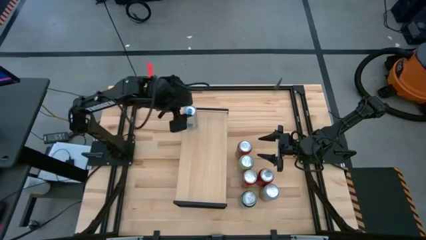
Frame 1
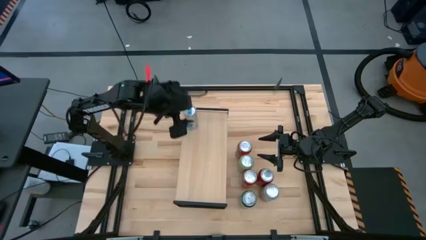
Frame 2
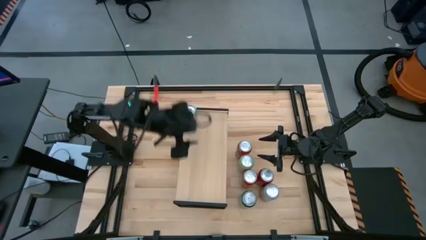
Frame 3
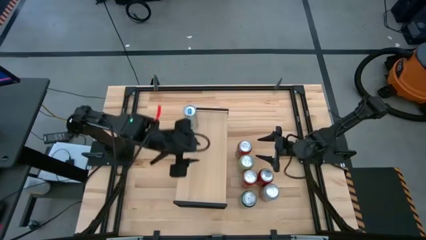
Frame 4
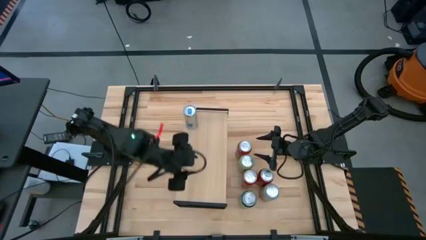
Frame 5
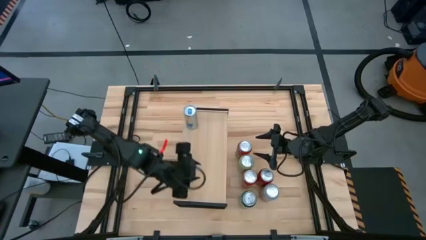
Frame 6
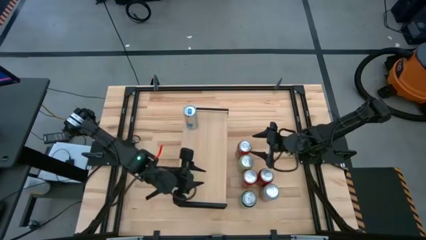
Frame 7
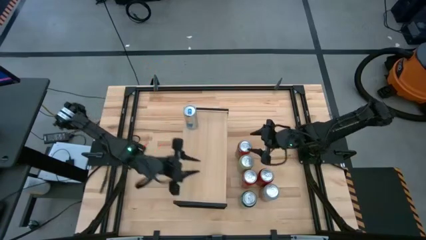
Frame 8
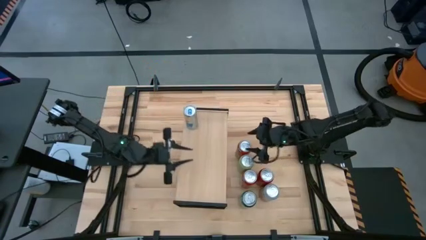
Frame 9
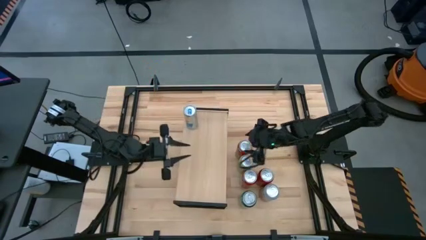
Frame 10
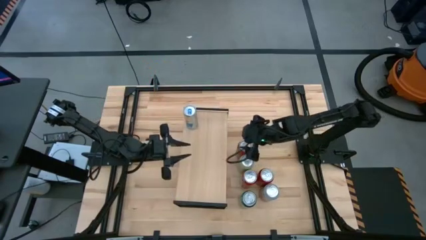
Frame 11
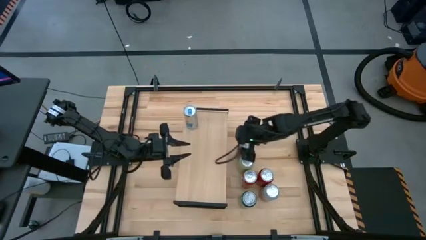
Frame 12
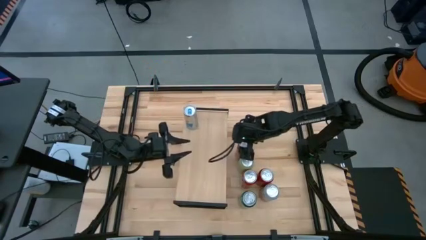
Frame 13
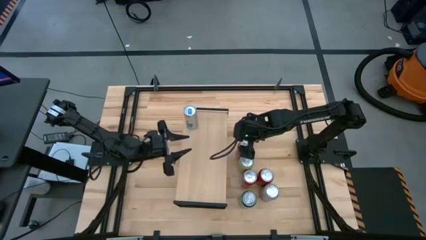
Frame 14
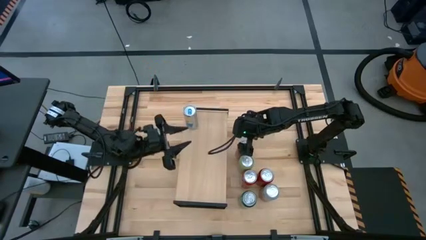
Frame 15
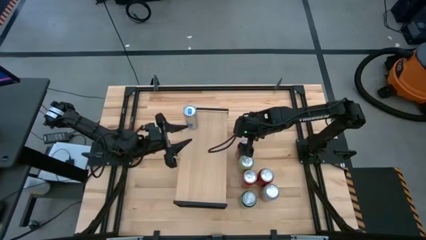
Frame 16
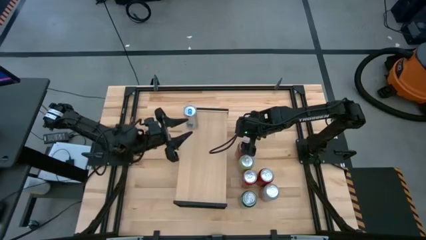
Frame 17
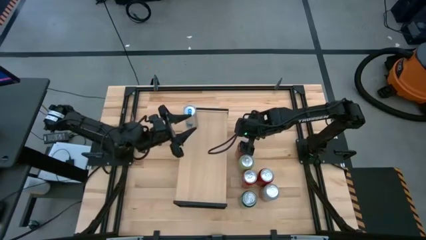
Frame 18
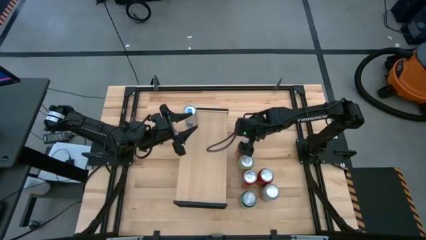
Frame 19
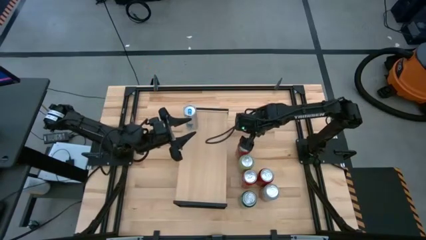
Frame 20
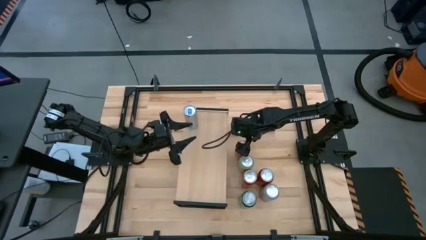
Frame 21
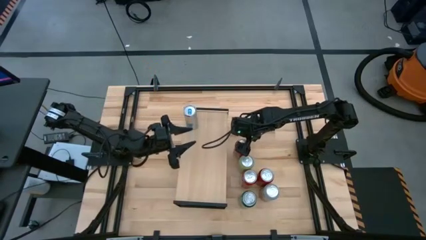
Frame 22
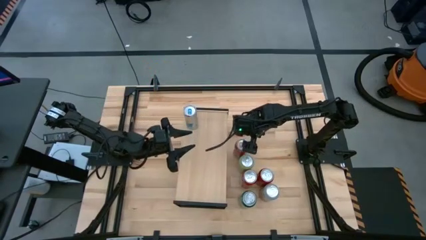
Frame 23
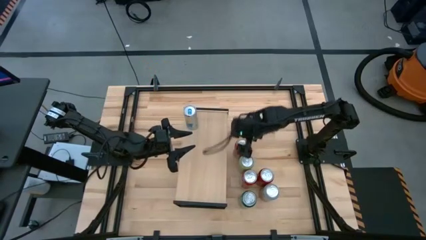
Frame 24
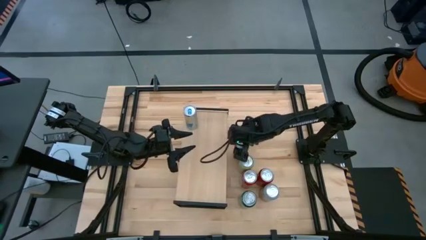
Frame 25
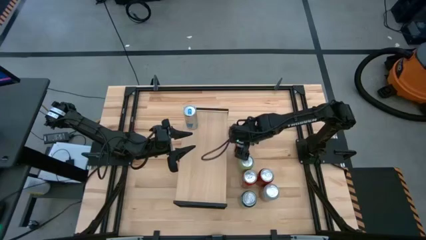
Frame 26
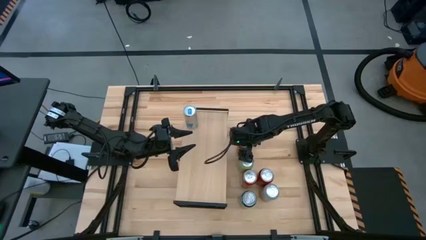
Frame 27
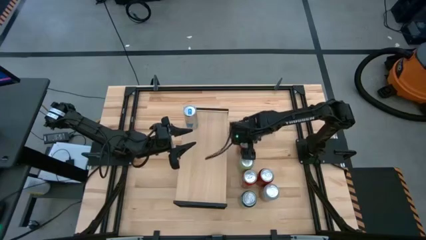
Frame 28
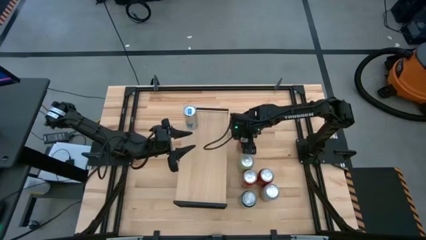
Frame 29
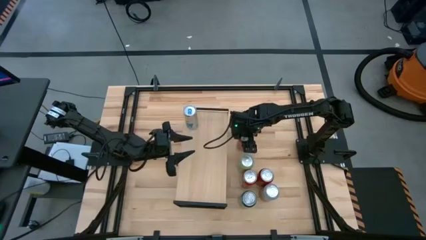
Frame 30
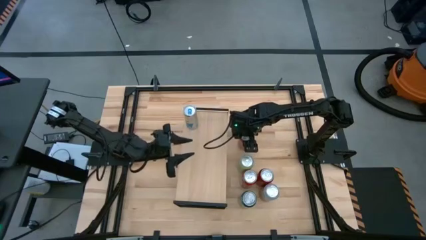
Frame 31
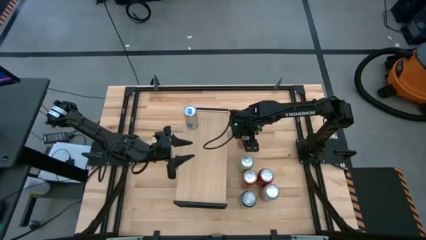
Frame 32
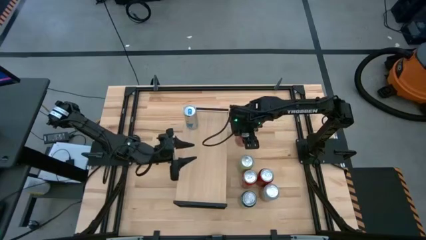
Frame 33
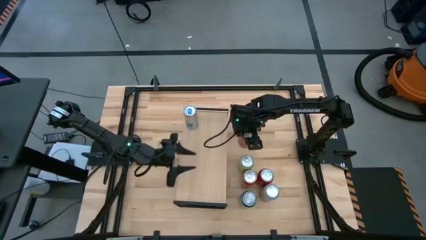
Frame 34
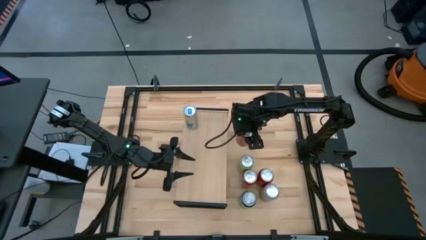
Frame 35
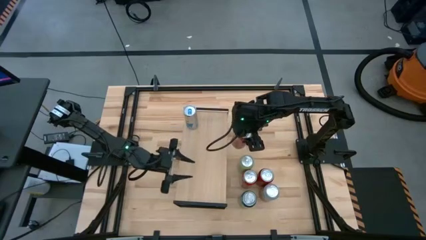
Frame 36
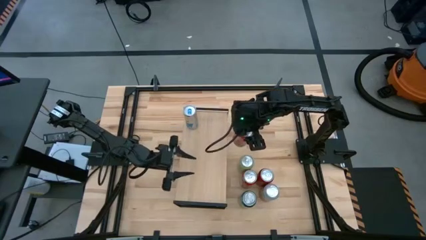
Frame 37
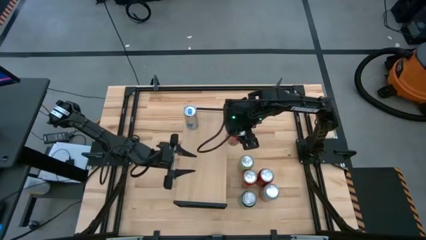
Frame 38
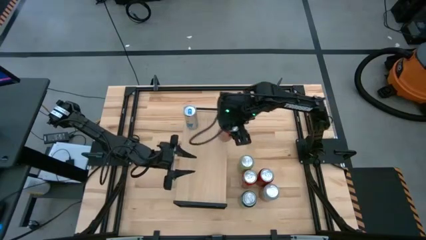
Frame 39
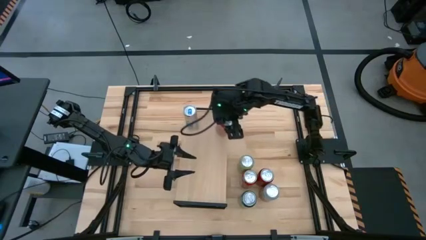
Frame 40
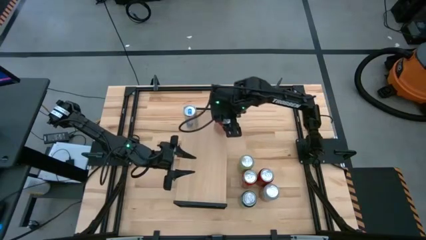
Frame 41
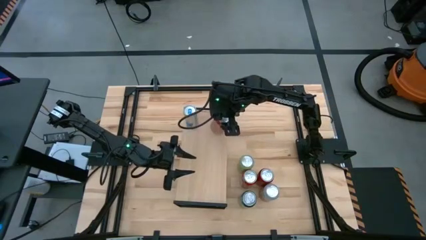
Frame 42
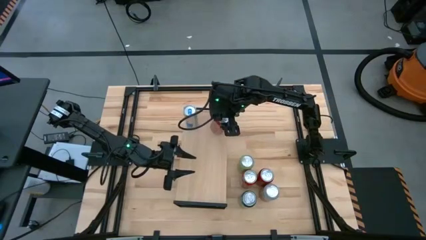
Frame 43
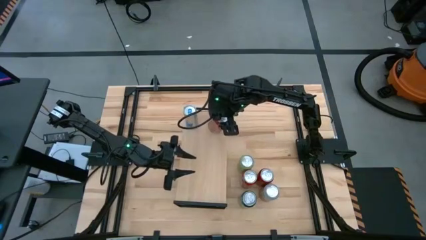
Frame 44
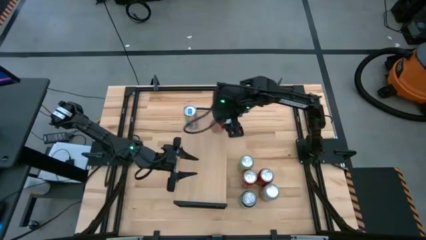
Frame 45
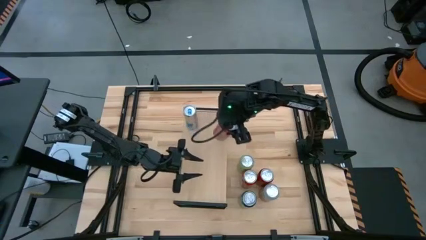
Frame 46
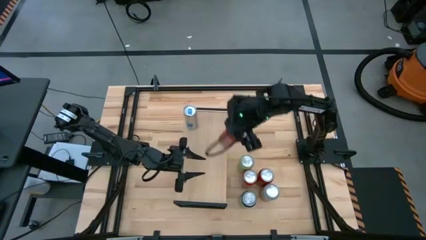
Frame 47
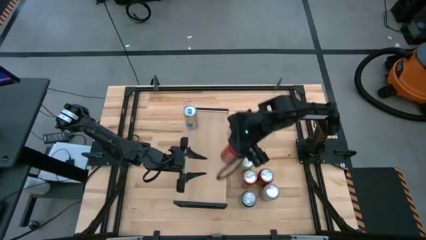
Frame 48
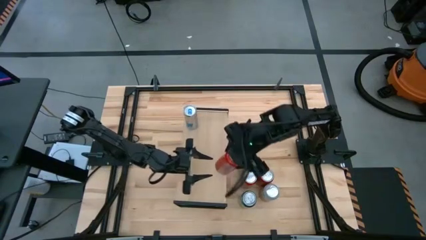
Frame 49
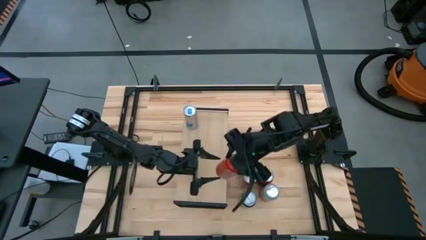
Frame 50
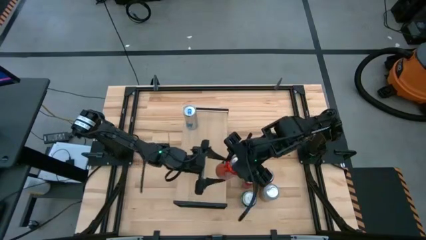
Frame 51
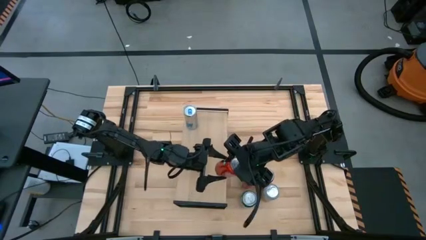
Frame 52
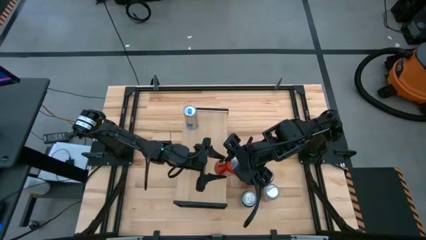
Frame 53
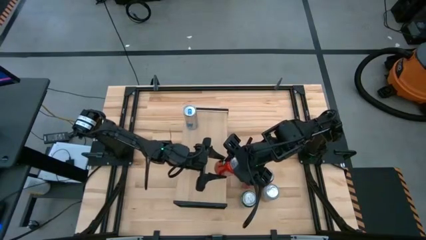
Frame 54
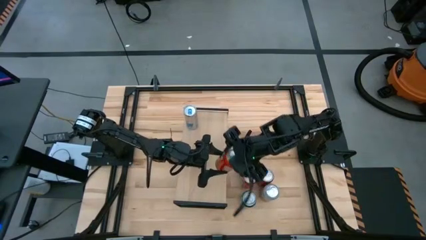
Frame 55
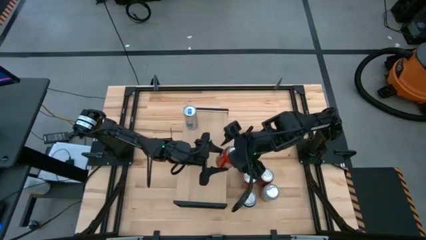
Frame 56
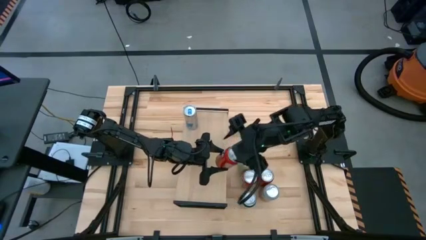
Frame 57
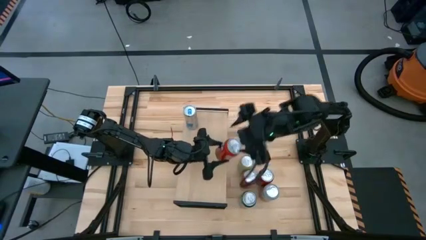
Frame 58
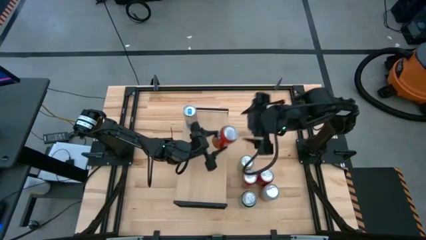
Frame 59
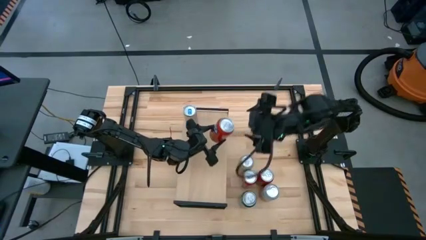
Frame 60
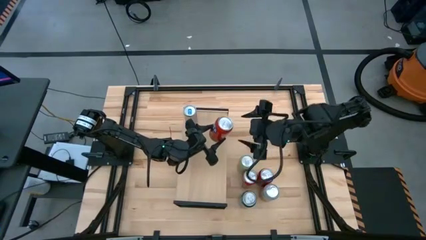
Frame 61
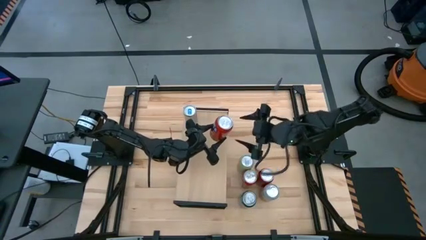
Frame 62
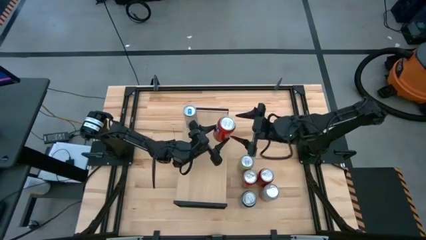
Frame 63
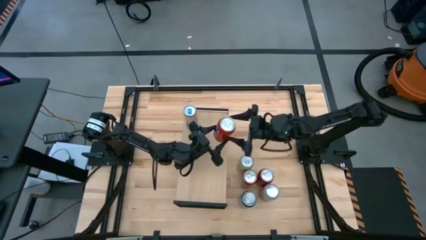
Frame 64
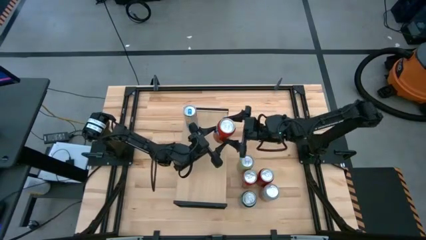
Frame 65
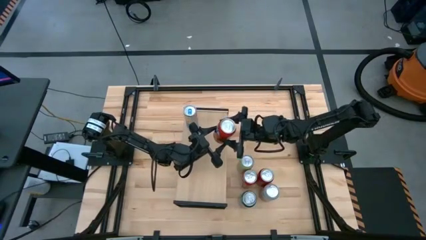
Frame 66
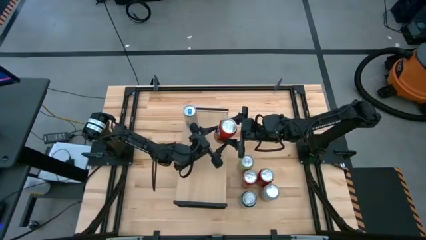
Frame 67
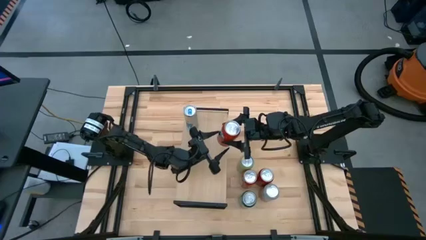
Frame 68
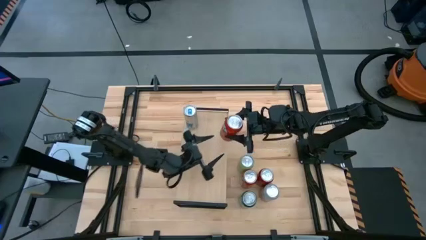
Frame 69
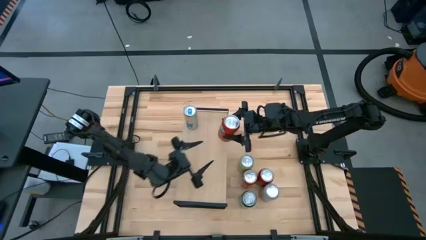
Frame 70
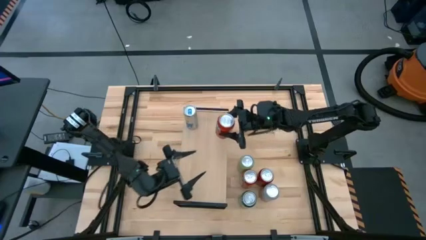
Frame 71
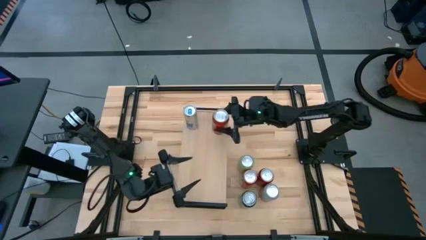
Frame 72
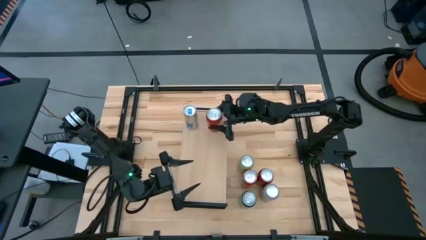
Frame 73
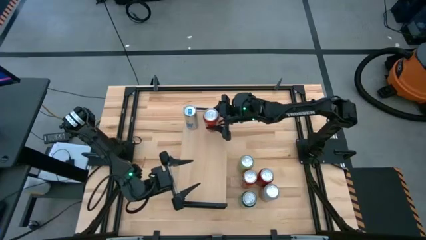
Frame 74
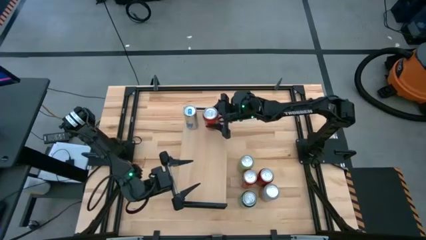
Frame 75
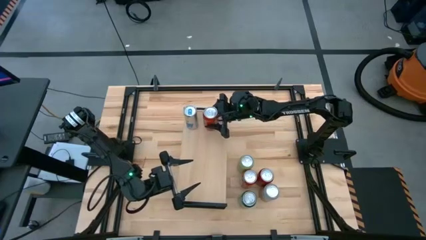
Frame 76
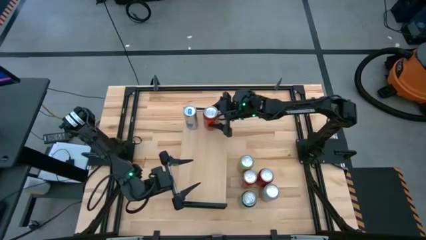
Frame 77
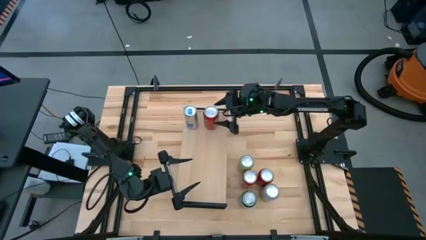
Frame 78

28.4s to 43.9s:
Task: Place canned beverage on shelf
Put the red soda can on the shelf
